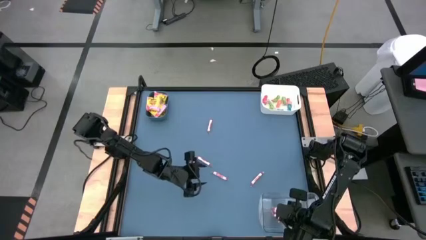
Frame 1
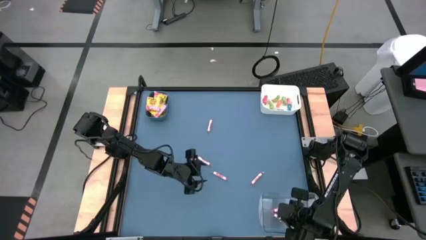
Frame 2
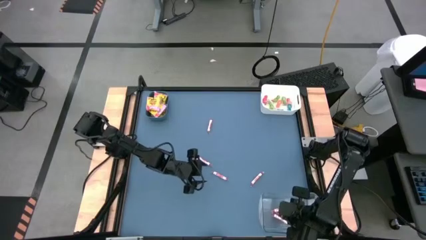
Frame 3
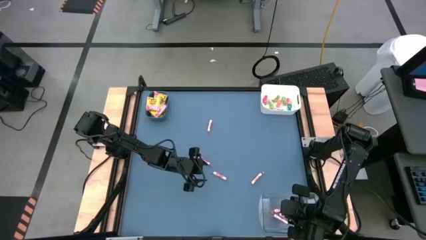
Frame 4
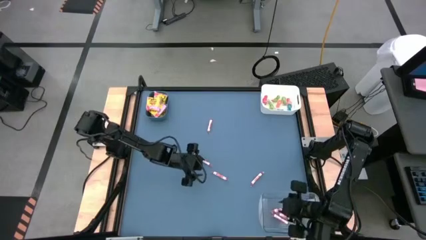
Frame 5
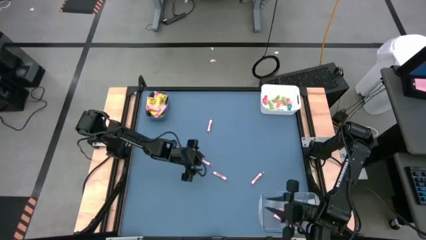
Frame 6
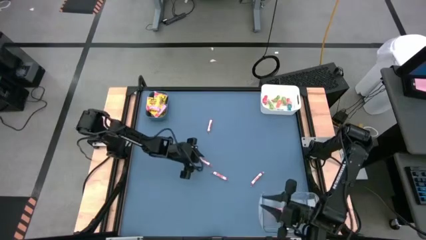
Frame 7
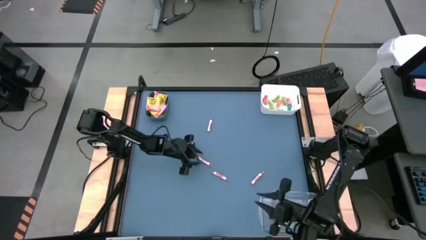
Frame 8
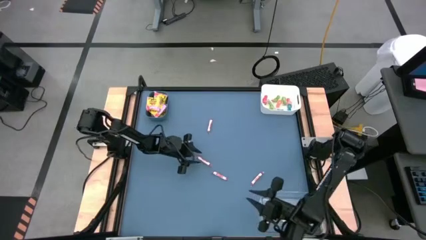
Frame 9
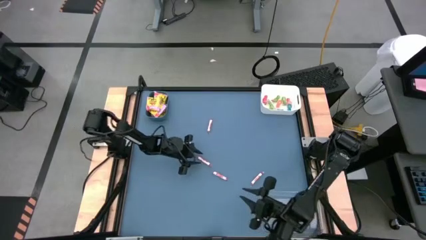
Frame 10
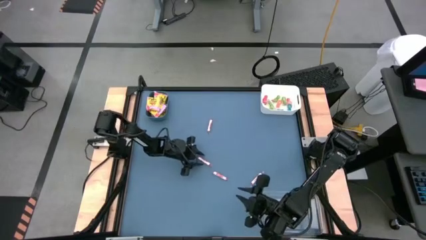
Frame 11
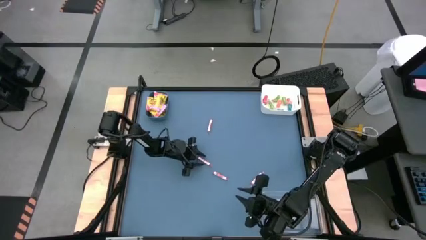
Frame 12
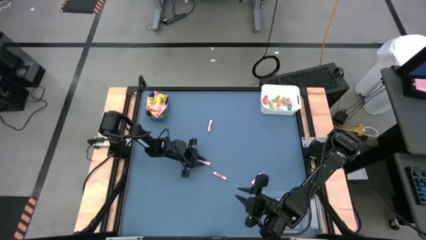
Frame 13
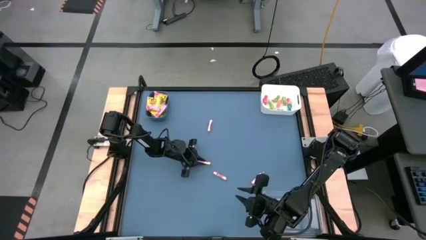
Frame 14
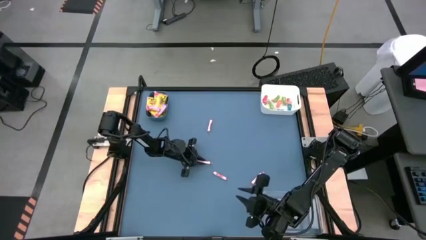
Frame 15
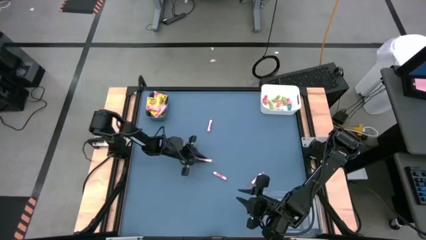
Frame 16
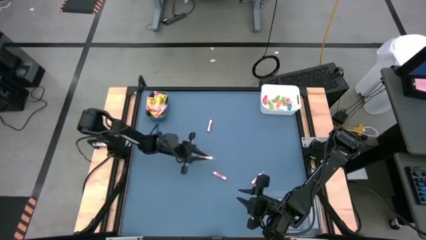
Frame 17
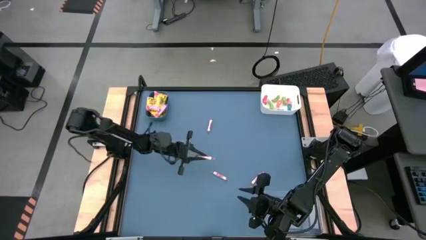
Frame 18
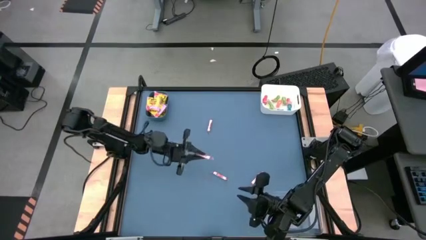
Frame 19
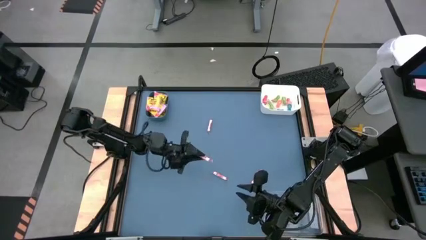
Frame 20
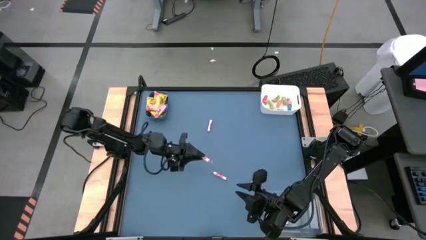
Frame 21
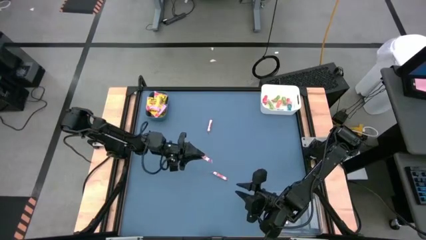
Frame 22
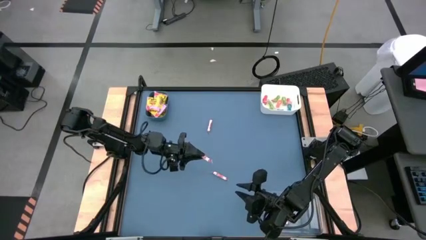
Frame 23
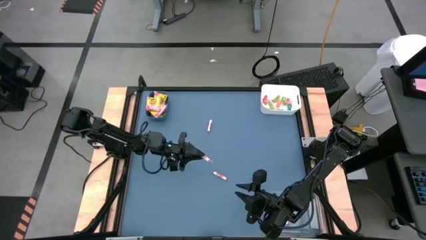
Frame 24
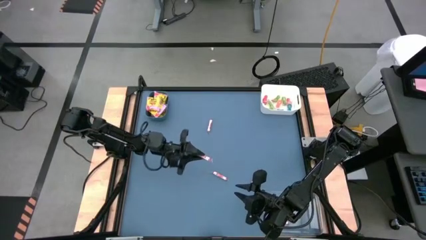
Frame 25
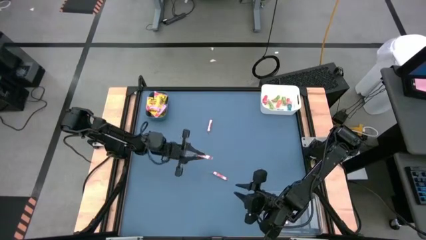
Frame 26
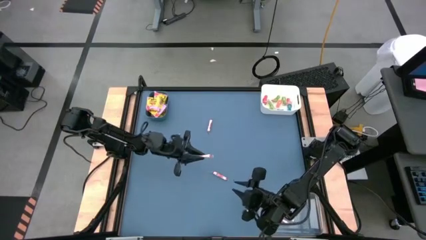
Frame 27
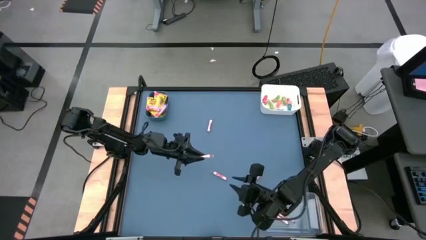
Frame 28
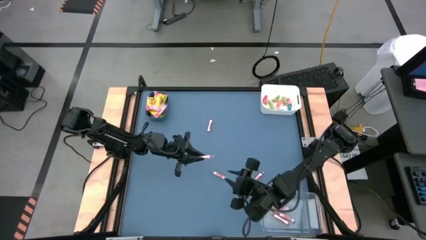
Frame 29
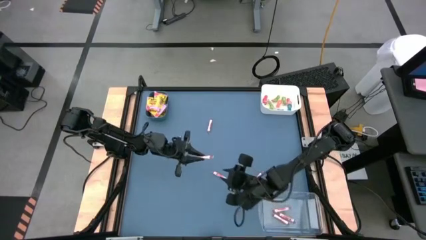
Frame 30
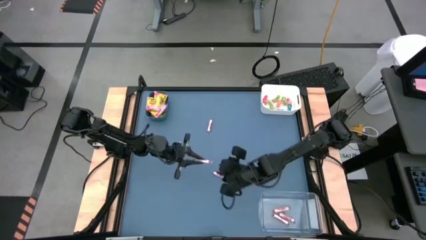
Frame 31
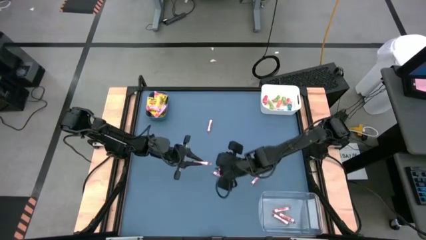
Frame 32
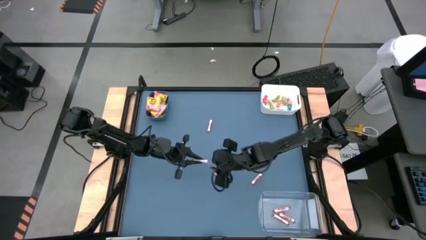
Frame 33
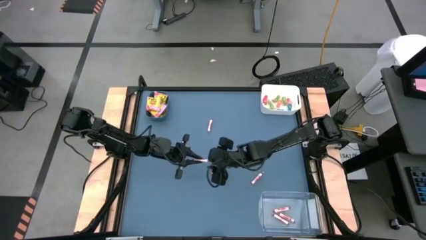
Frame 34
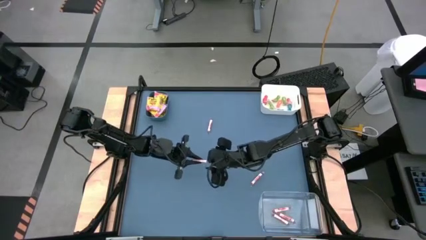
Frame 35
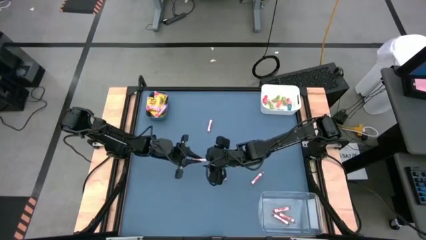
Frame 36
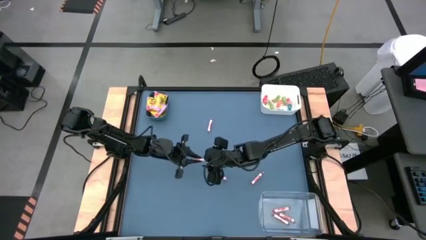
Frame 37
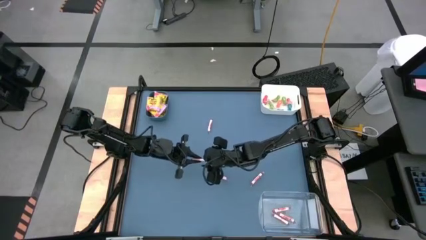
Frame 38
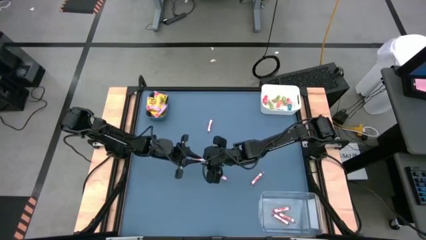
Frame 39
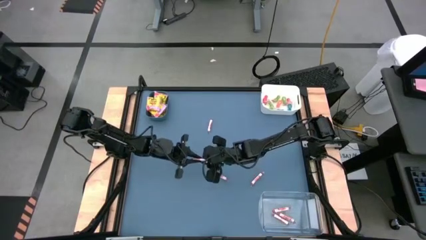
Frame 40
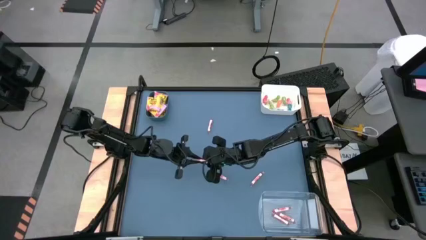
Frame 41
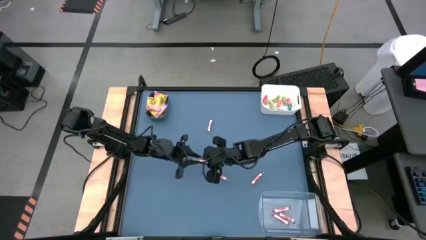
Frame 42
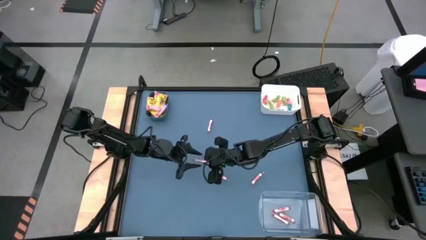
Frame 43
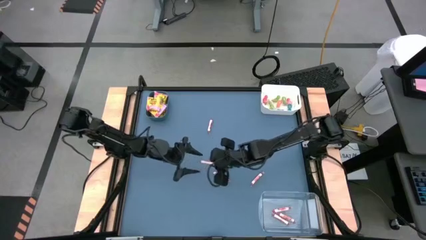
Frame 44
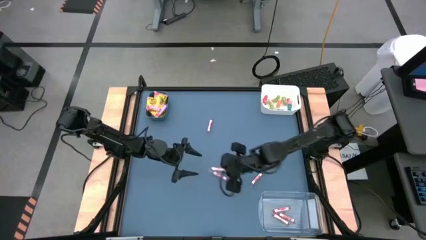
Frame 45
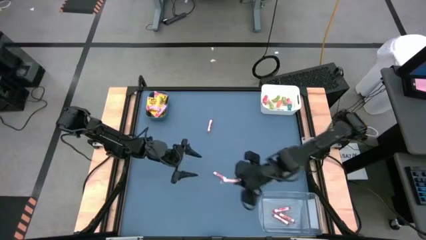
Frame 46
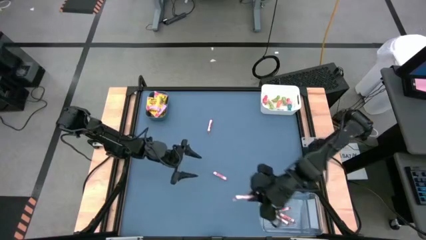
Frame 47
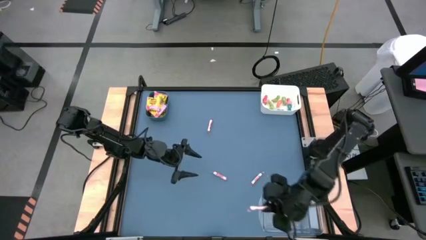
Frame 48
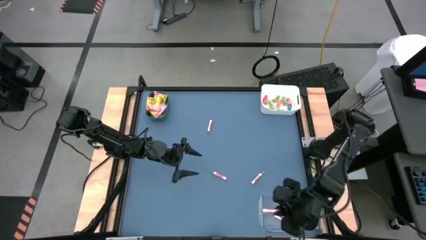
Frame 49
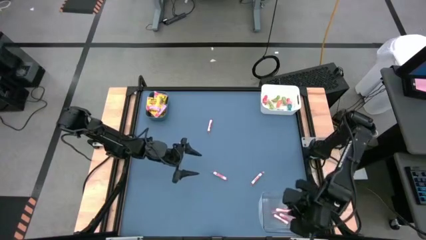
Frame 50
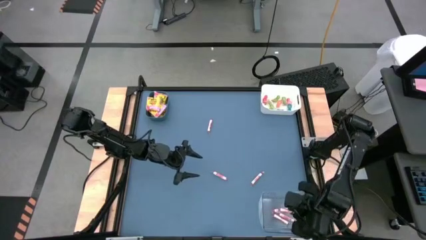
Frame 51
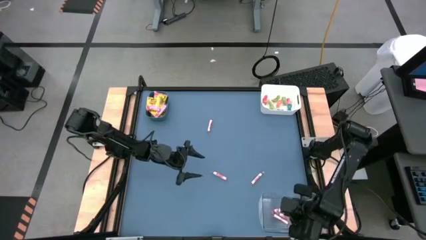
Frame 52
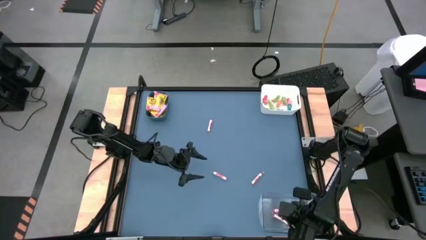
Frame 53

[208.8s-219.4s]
Task: Sort candy
Put the white candy into the transparent bin
